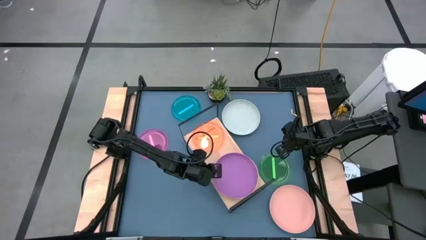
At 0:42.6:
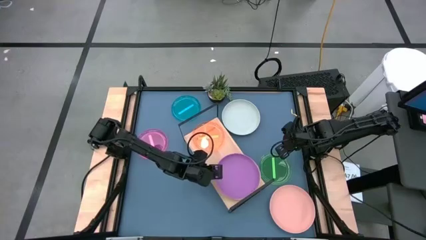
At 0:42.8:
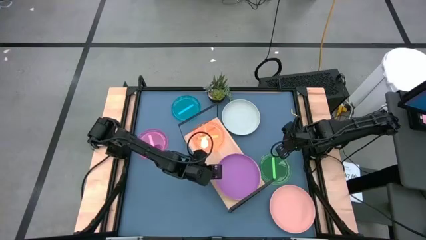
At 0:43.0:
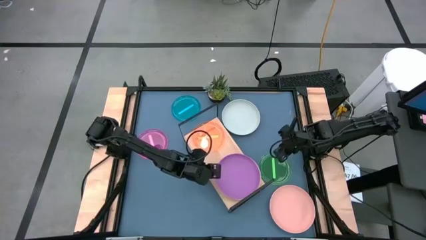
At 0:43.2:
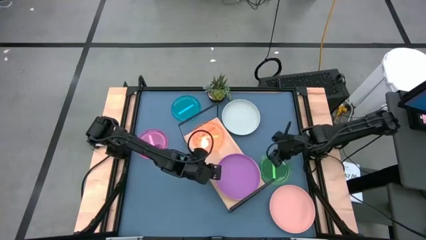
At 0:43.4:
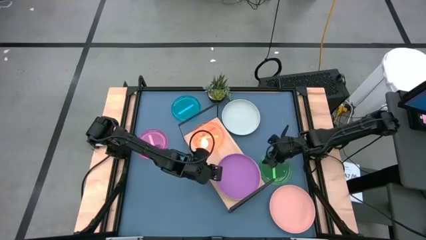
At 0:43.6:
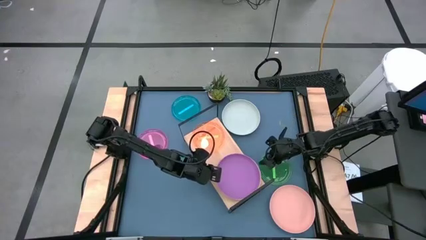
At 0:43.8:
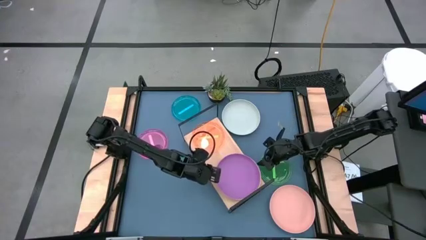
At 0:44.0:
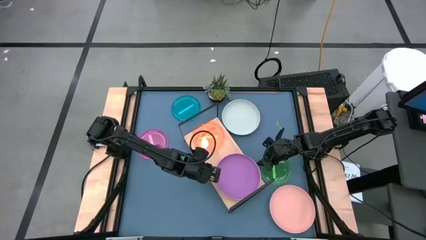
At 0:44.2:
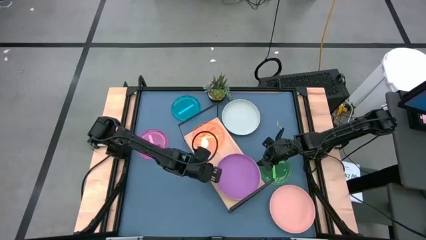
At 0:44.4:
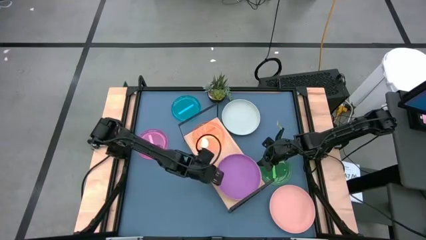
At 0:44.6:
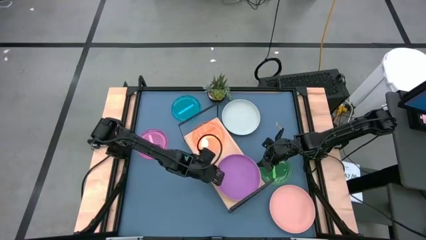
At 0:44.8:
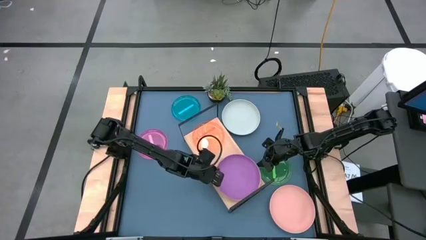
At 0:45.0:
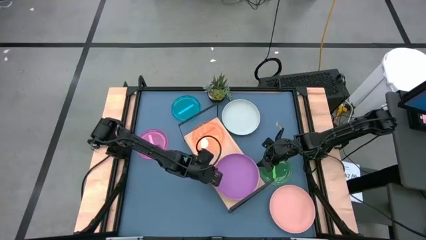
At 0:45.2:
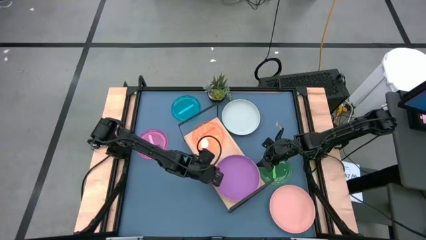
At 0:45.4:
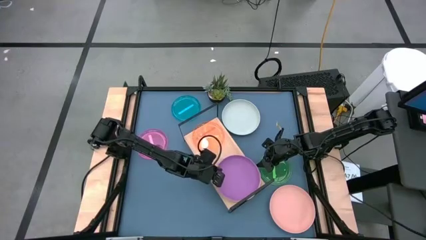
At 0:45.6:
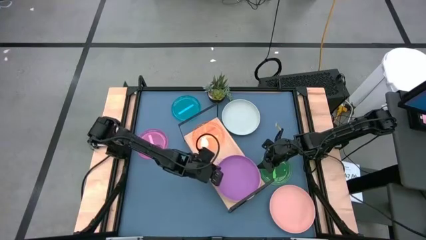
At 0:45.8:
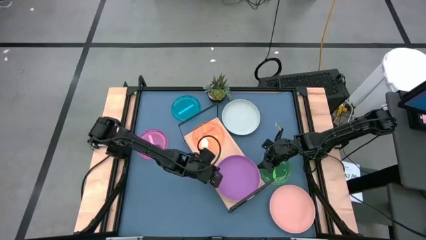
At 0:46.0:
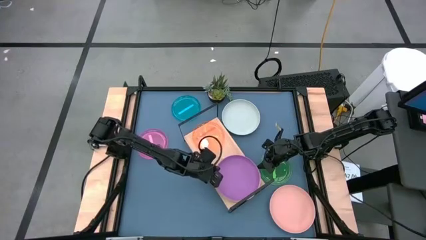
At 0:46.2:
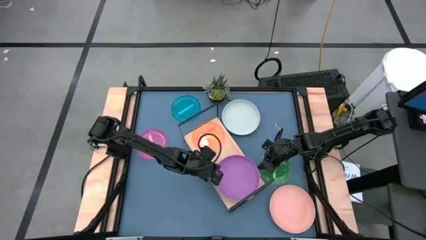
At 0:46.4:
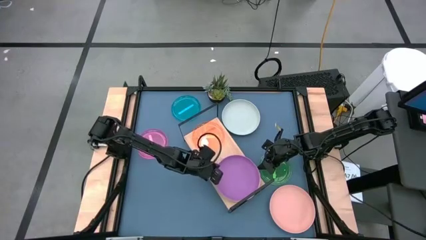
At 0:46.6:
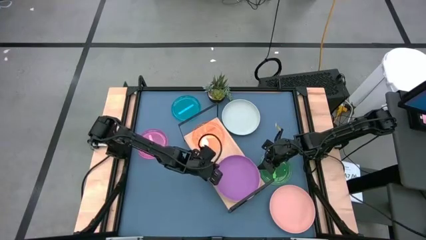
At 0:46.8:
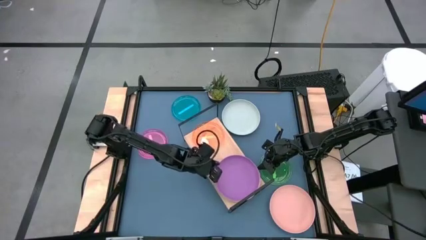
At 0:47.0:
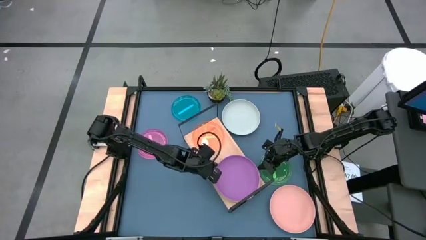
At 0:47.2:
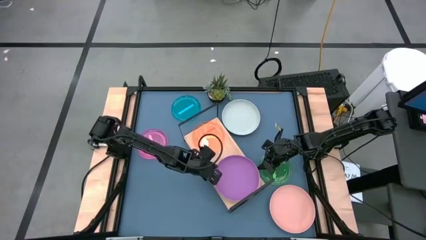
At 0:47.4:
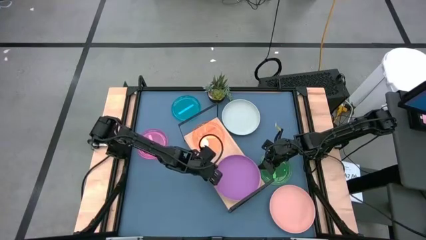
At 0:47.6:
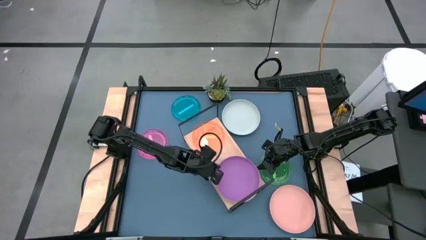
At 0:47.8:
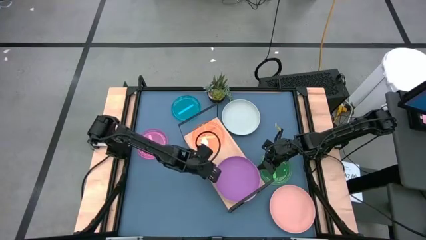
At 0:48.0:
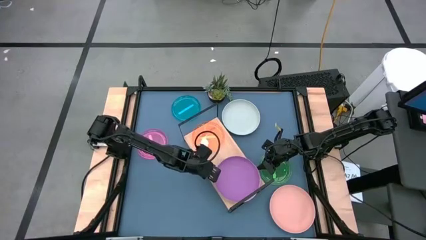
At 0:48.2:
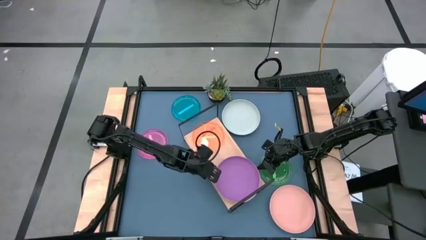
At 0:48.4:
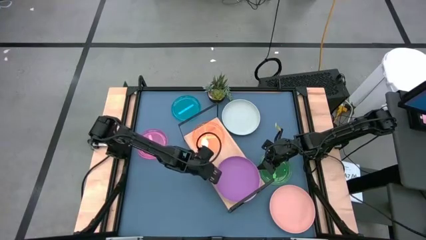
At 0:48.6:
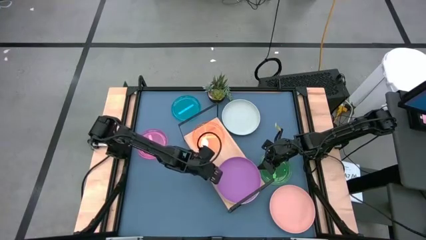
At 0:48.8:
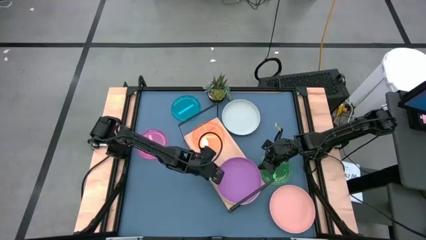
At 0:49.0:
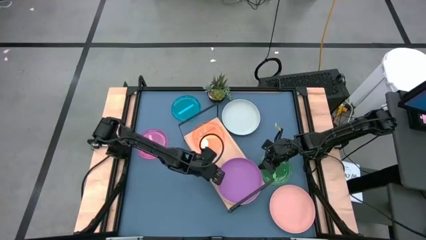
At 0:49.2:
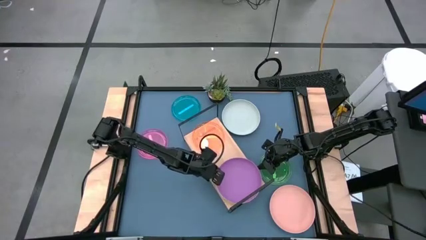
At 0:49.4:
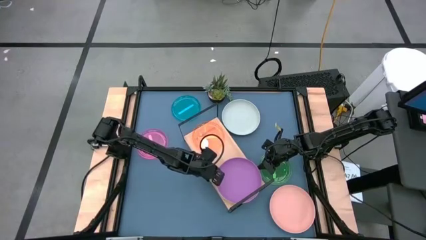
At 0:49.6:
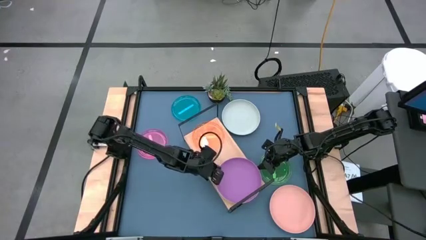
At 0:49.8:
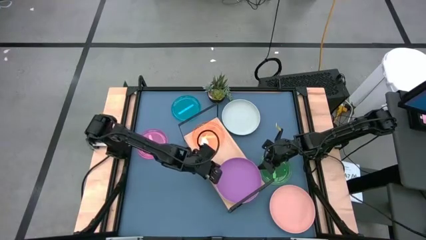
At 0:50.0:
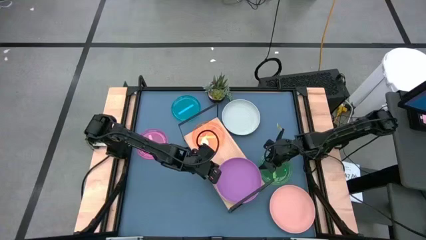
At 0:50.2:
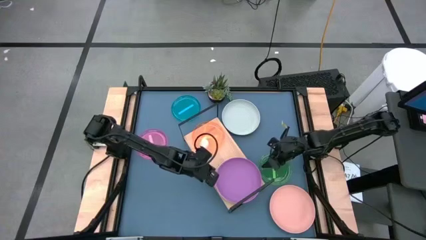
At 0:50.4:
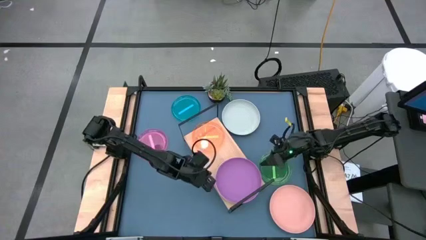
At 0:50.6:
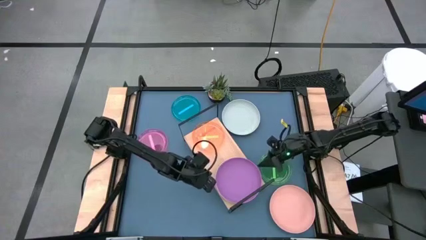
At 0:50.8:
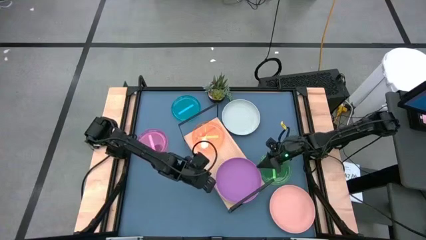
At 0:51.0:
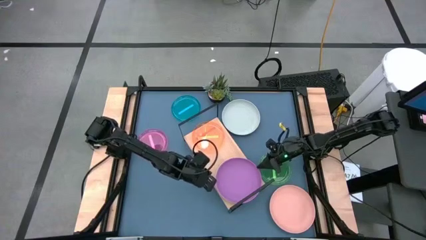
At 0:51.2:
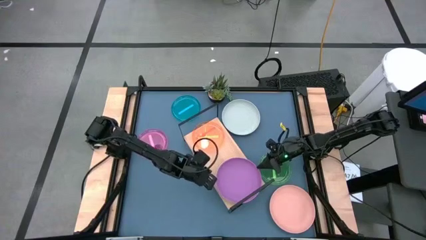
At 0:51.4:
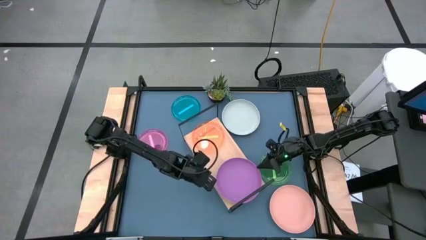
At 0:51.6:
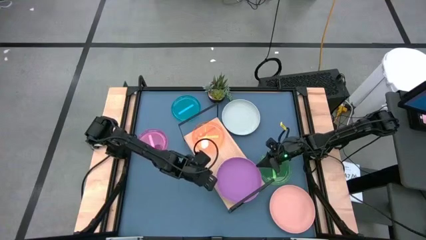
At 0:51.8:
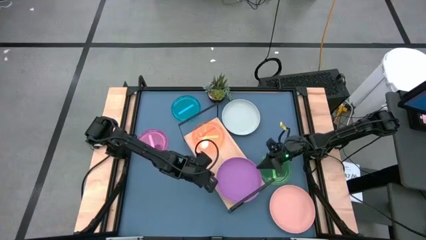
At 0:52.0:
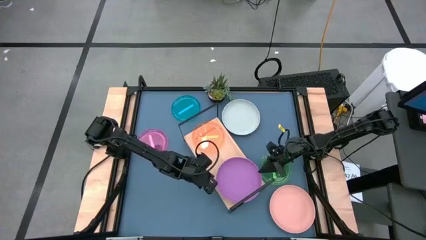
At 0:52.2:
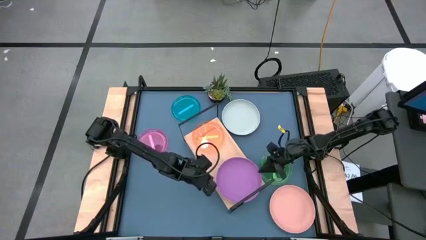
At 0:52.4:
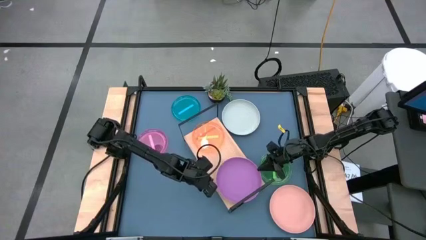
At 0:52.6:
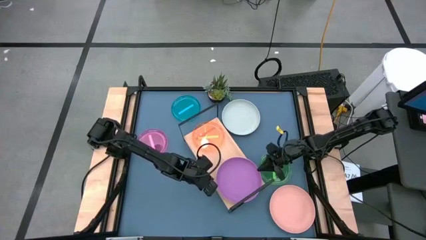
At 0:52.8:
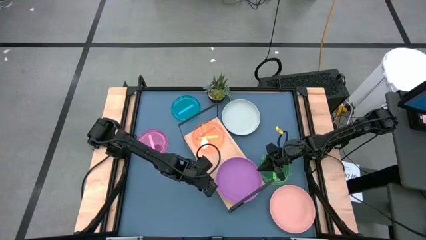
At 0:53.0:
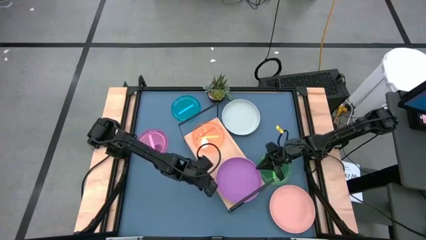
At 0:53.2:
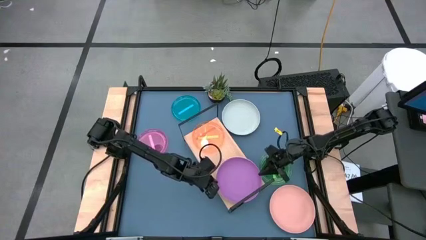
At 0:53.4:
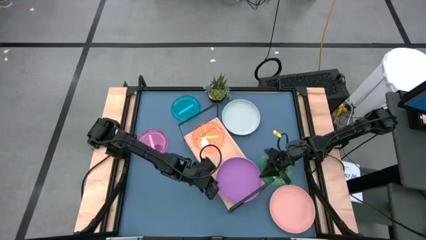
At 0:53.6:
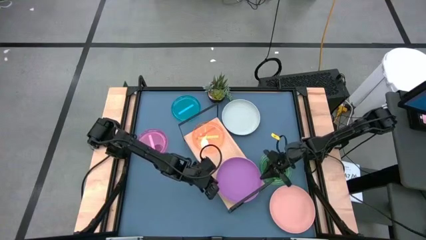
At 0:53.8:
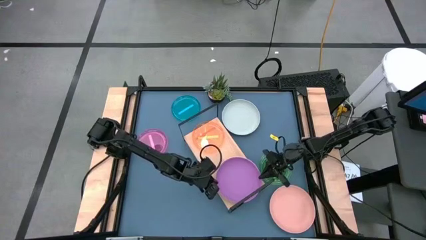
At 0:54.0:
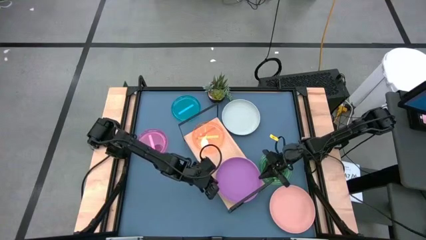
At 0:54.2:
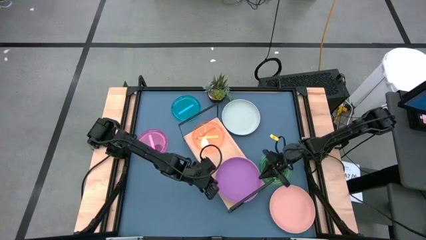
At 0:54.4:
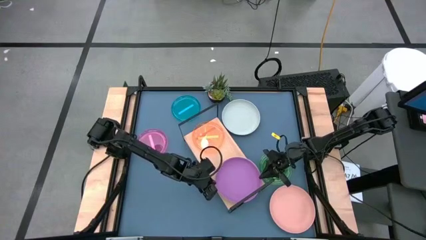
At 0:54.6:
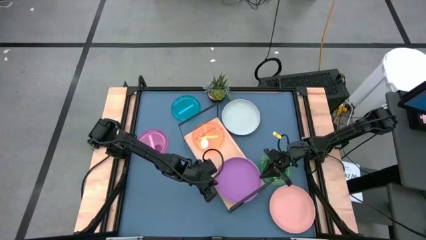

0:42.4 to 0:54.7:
Task: Place and stack plates onto a shelf
Stack the large violet plate on the large gray plate on the shelf

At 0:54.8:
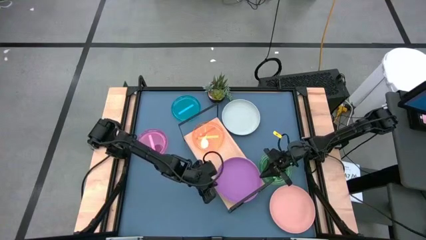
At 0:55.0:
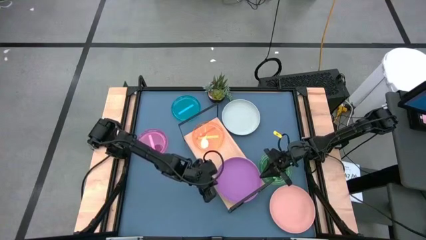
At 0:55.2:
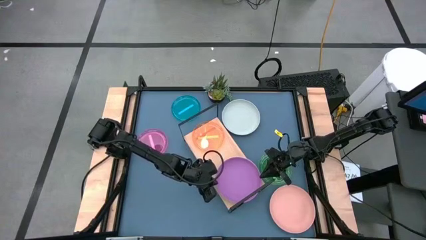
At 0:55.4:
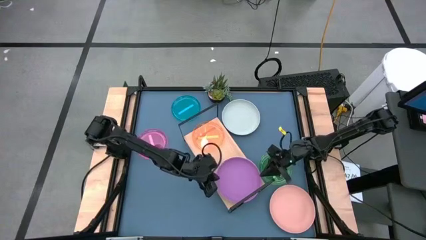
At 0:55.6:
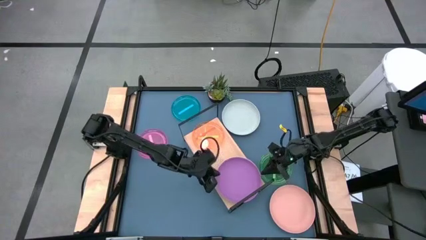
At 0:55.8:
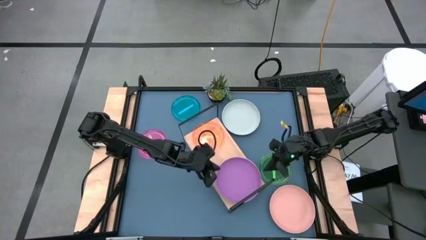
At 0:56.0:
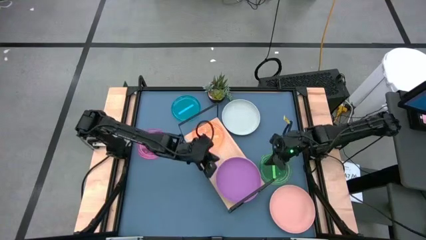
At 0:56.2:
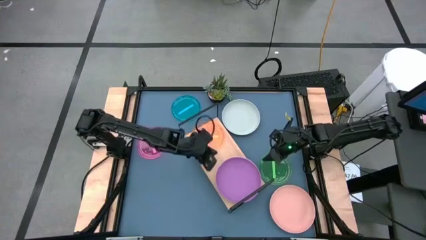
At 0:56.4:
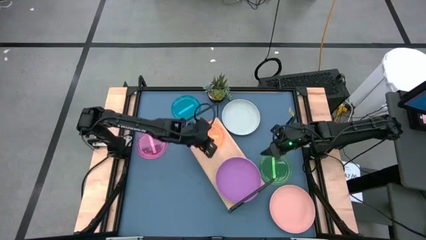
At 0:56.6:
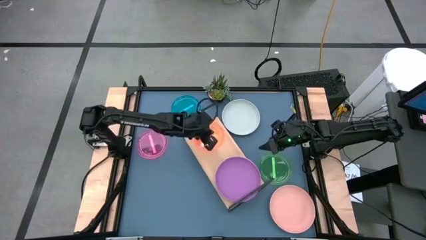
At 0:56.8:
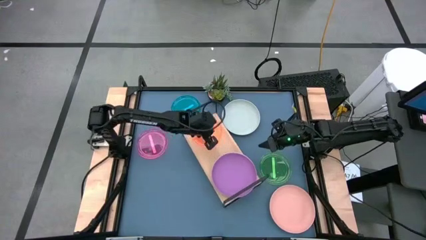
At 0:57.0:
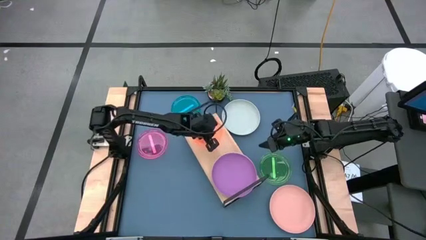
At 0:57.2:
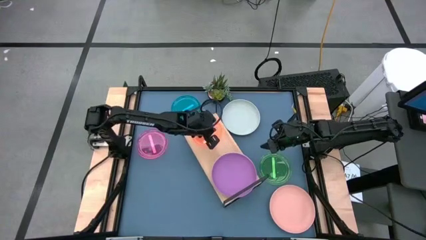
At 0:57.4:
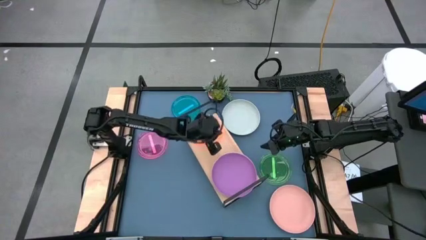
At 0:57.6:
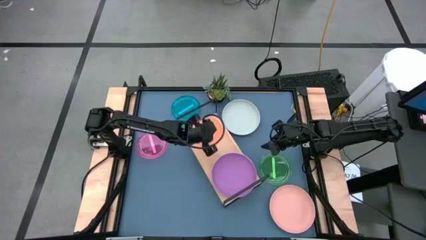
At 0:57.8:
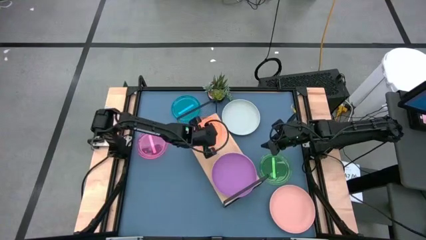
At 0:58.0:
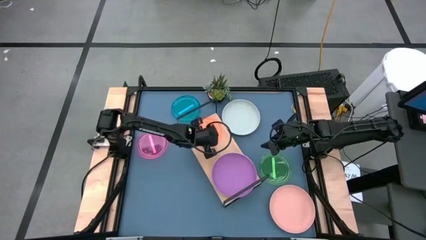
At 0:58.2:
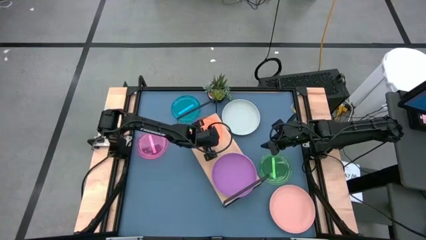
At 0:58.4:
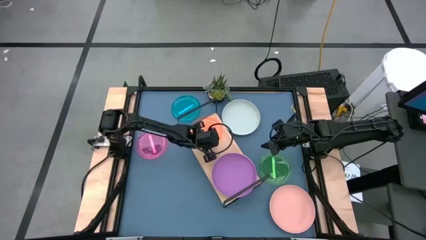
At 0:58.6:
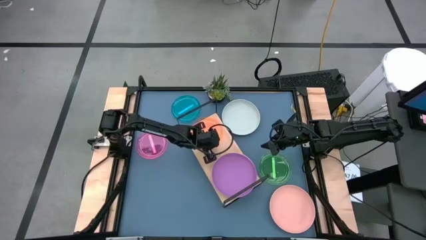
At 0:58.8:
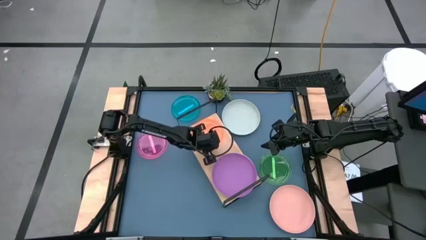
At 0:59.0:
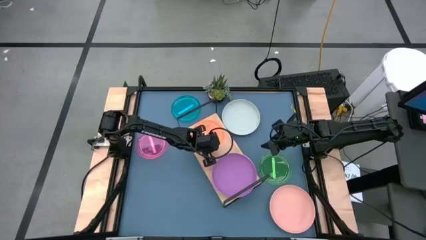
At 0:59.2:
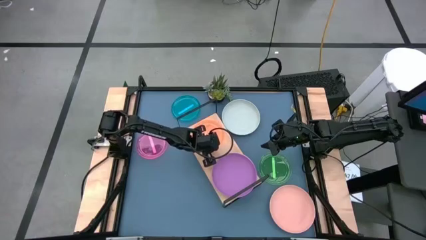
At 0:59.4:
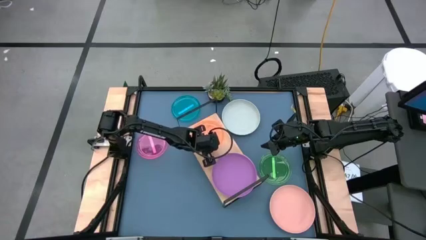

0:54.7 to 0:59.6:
Adjust the small orange plate on the shelf
